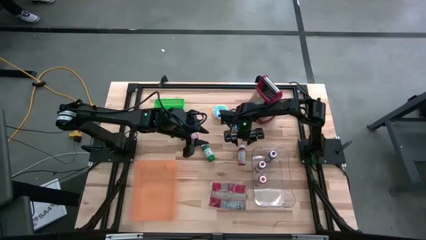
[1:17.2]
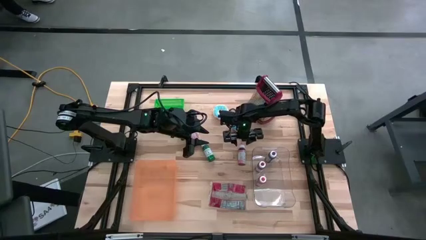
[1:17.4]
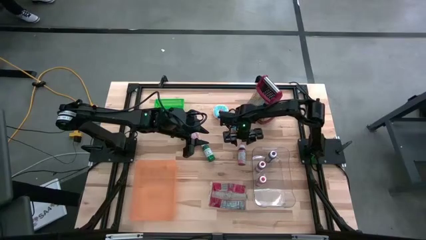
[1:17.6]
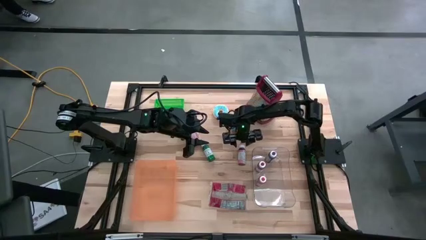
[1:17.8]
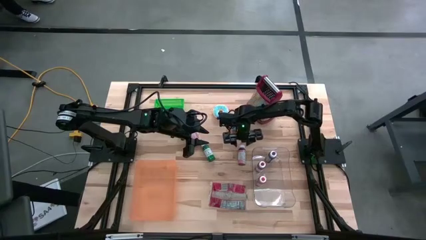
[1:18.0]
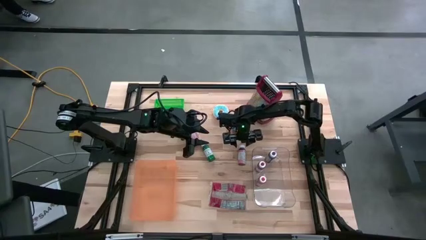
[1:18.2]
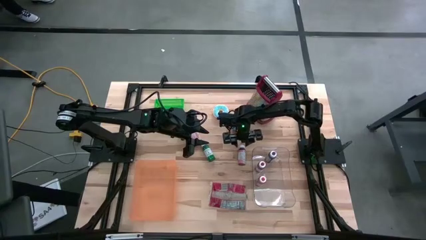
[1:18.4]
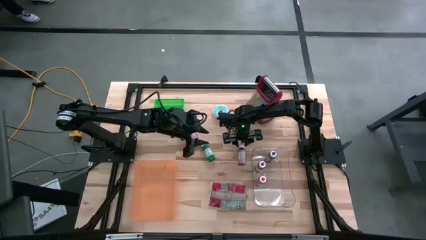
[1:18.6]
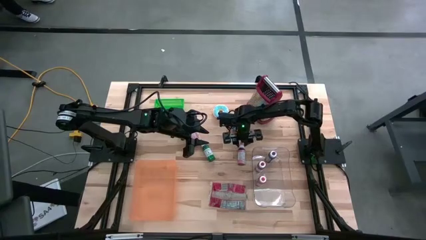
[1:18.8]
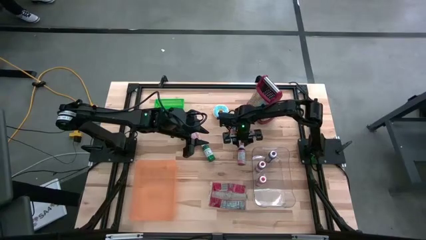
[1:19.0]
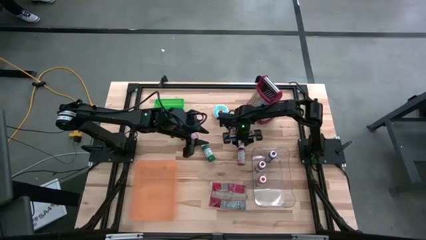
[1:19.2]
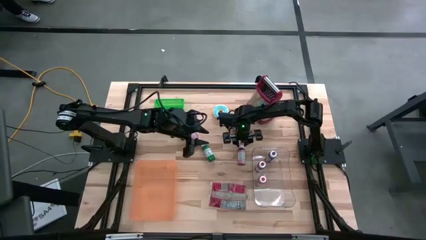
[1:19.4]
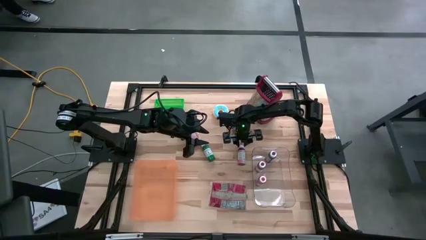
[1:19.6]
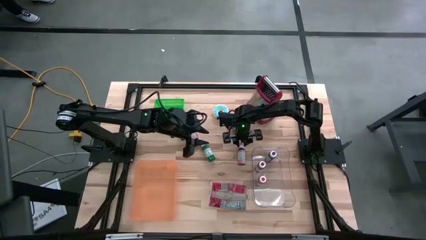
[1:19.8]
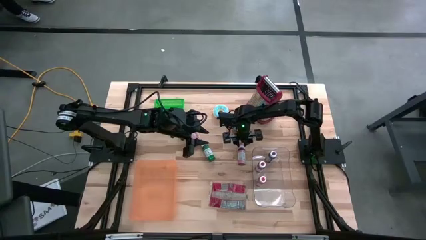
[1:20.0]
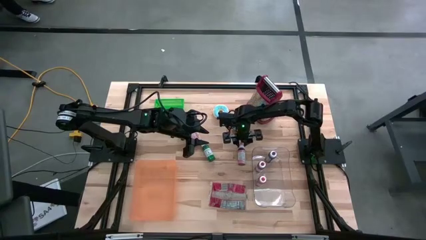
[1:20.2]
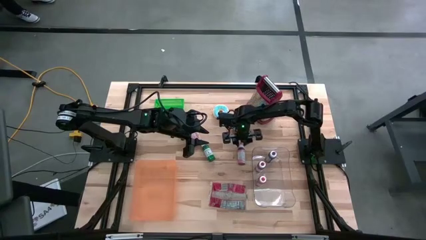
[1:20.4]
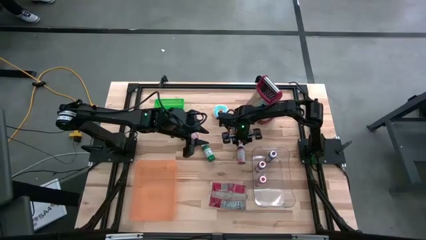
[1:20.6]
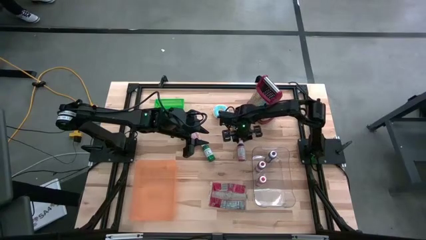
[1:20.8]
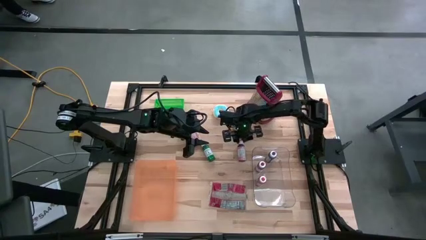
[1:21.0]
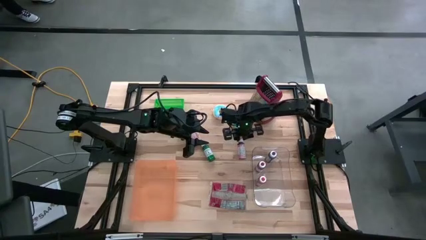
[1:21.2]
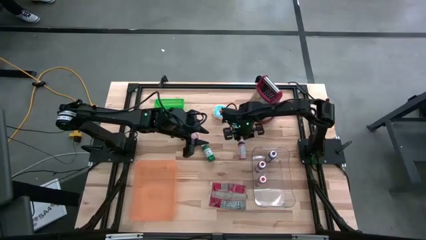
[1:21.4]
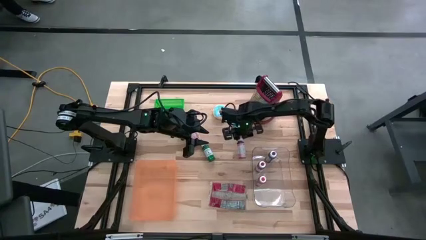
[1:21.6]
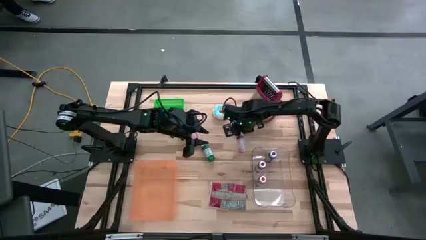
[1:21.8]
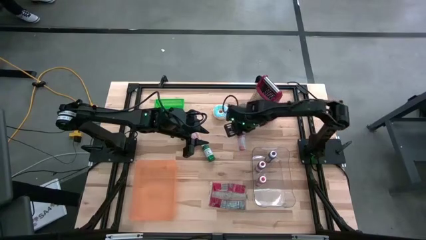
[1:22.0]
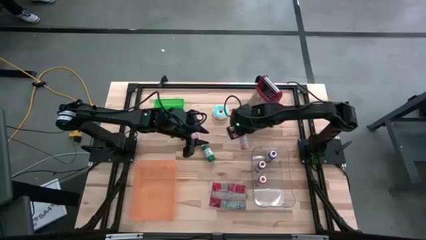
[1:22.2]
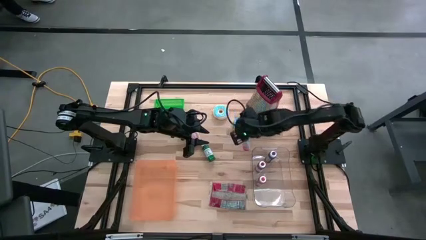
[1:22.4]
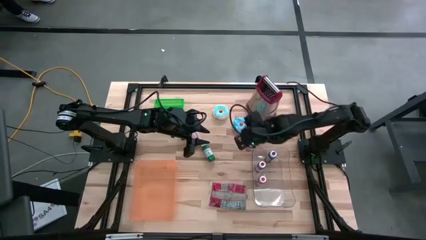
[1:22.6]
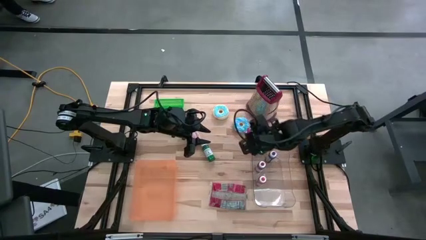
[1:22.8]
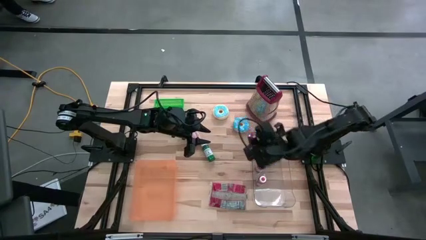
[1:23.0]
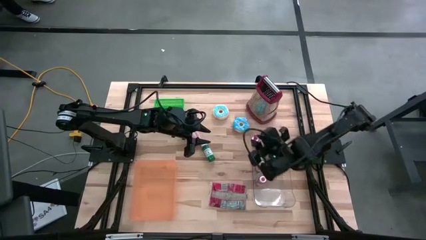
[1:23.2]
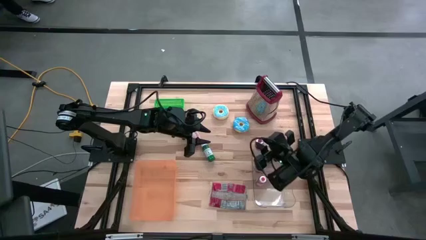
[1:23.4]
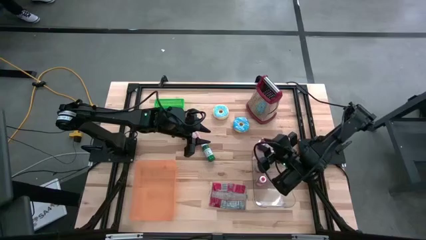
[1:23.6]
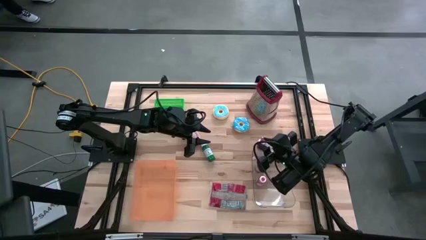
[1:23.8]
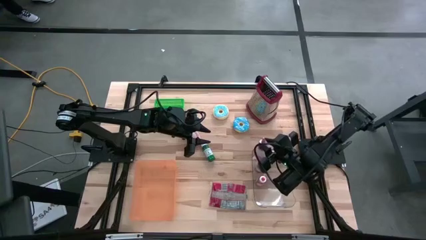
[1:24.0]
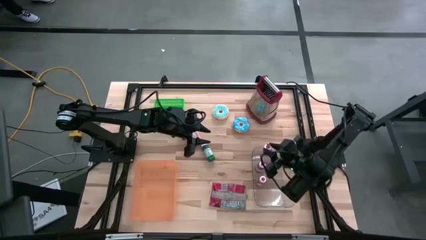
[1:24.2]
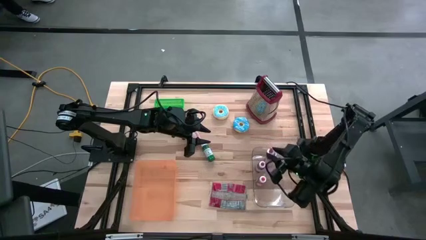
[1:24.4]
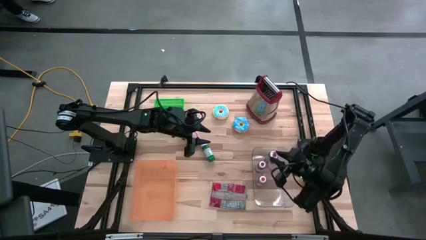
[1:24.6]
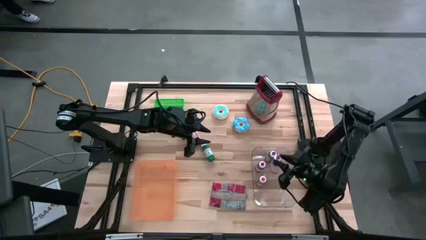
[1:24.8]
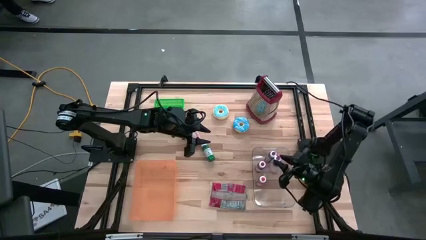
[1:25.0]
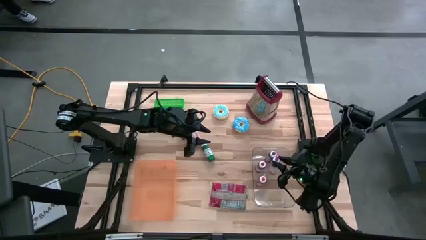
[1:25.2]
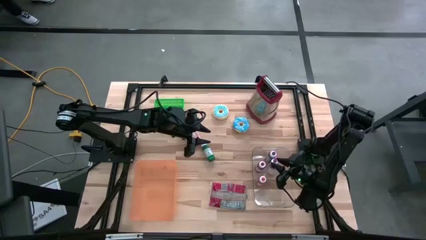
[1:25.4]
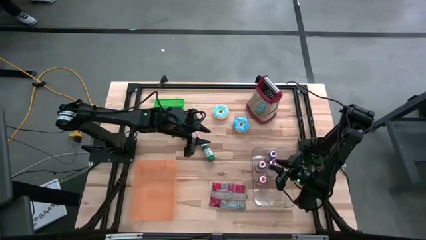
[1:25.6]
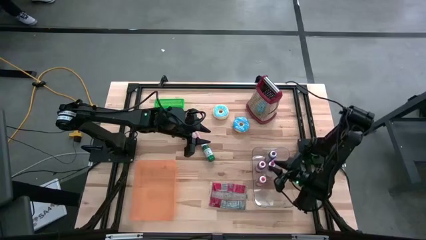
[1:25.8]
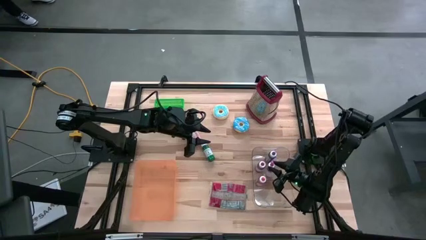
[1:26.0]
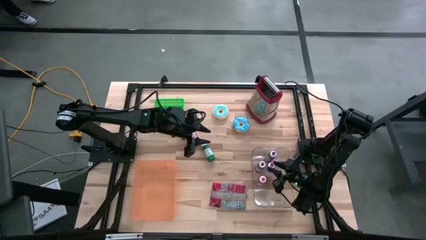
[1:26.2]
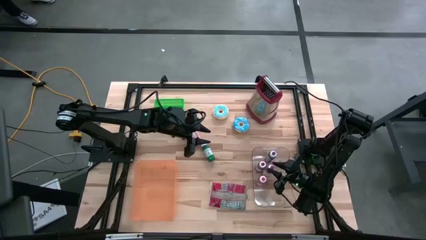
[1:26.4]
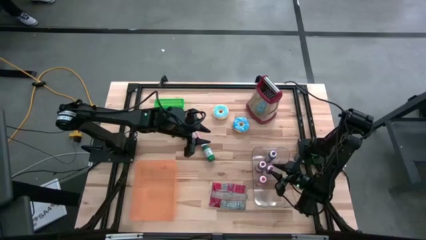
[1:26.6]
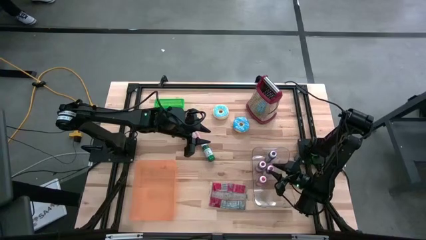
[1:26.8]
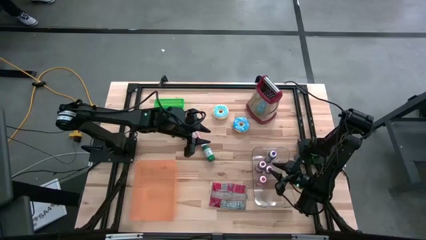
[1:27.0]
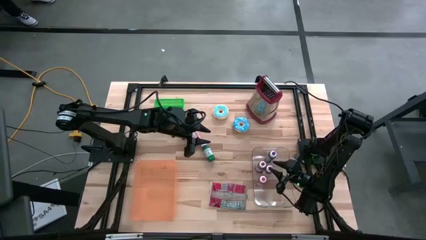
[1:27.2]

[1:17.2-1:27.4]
Put the pink paint bottle into the transparent bin

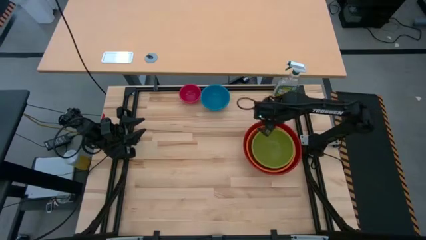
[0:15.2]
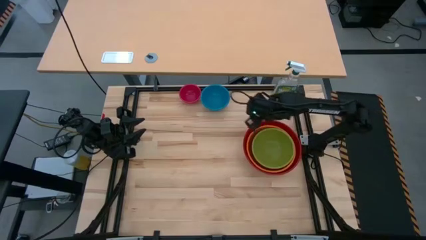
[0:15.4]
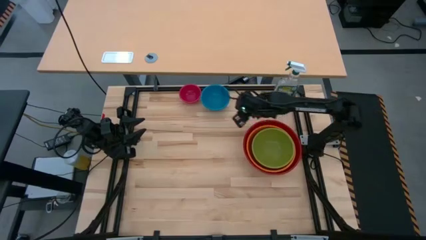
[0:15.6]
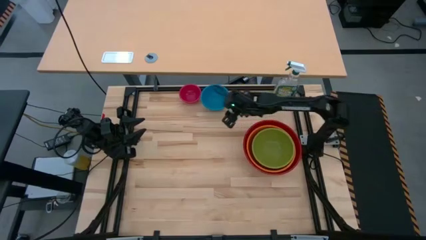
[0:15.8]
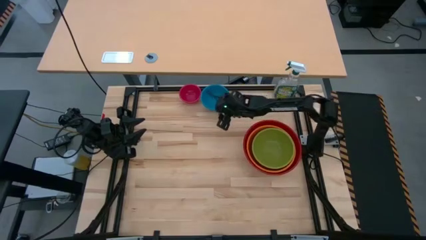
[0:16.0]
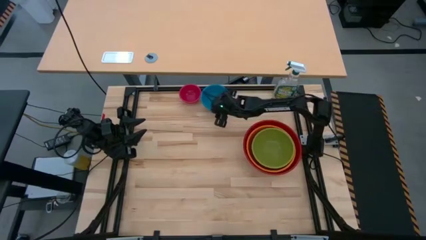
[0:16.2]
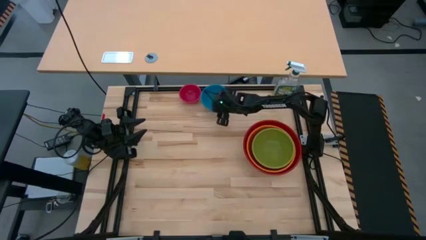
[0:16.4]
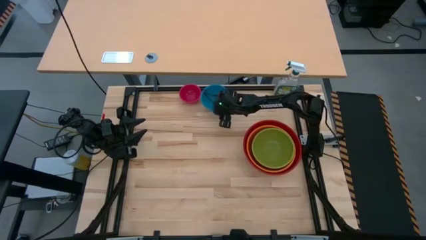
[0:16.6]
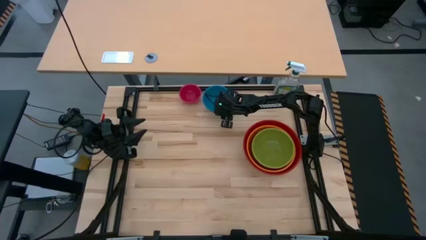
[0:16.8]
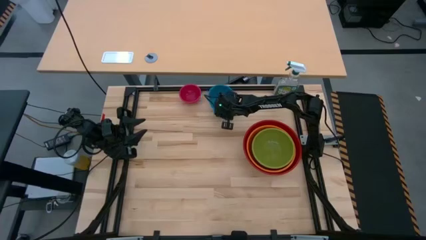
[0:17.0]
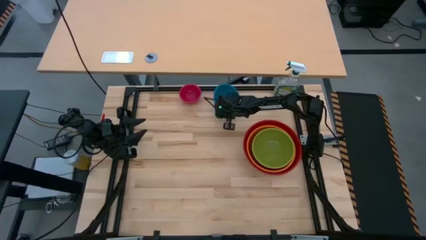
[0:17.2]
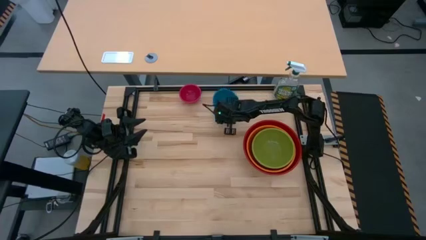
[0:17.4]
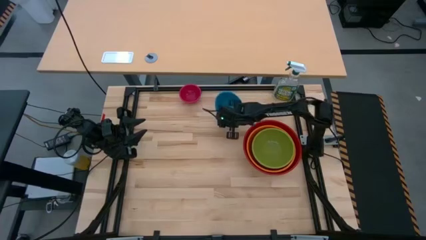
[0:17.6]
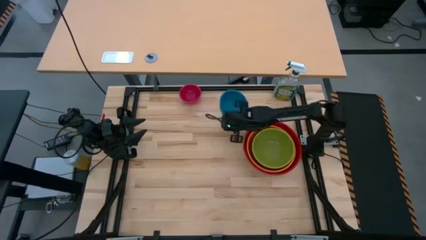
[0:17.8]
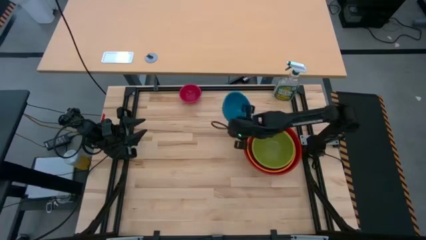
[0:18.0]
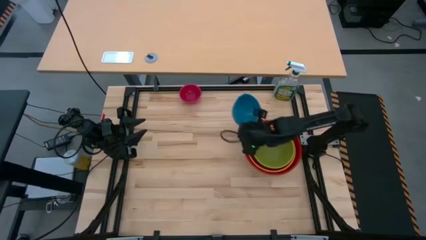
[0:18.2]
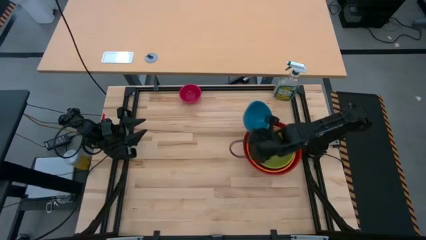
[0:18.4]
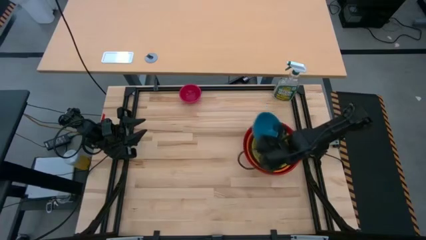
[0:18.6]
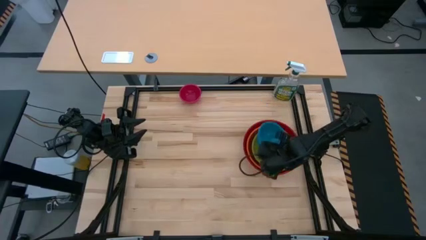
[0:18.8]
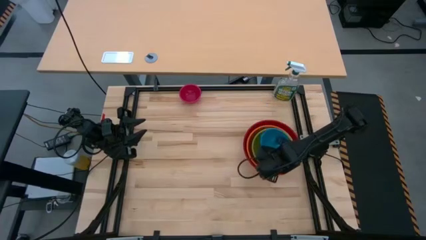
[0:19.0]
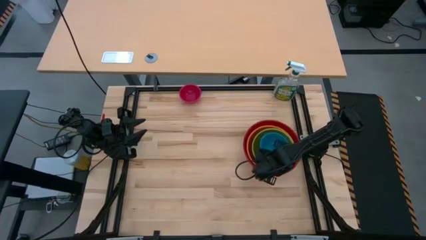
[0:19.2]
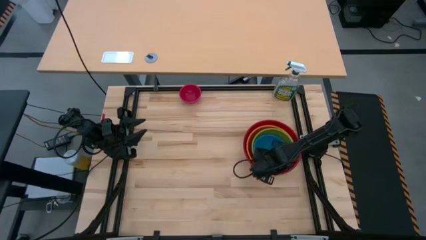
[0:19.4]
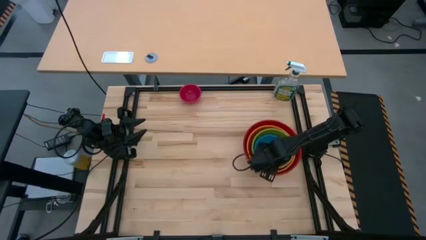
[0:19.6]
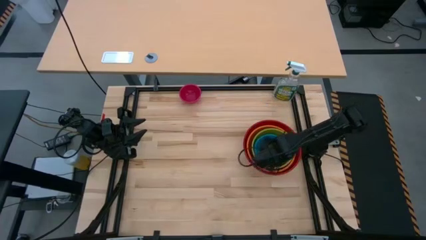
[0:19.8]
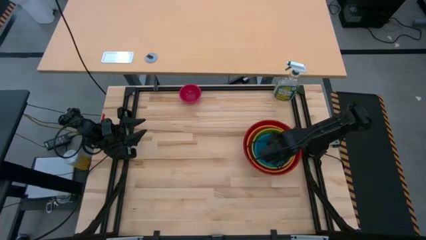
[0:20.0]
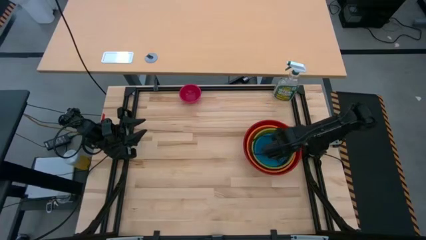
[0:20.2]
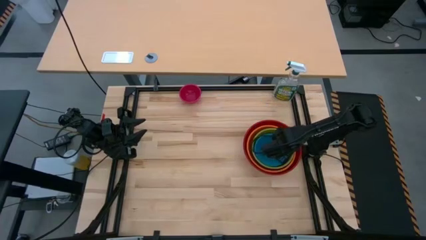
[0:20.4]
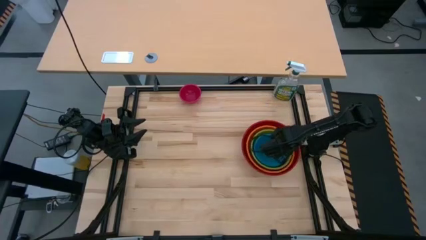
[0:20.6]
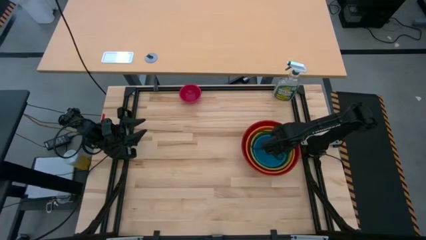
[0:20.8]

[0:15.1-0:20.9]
Stack the blue bowl on the green bowl
